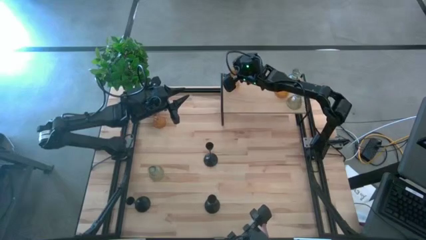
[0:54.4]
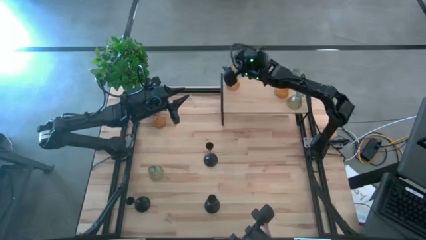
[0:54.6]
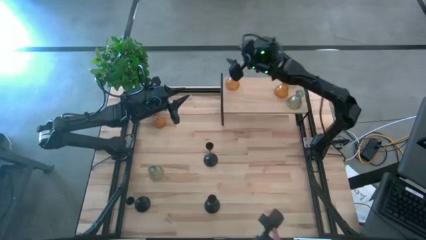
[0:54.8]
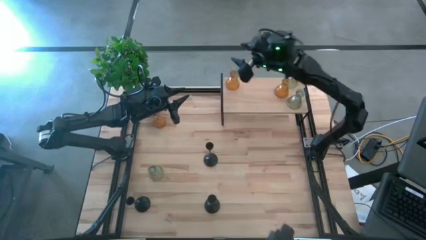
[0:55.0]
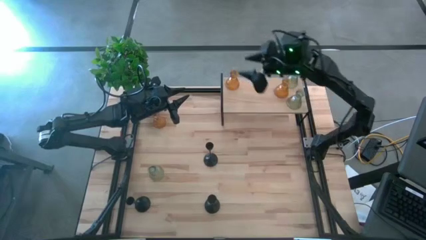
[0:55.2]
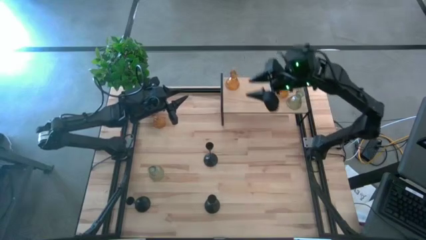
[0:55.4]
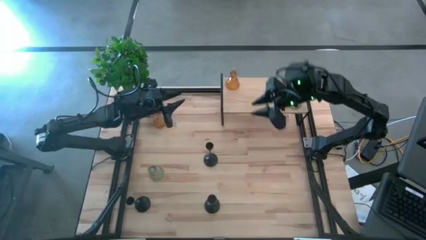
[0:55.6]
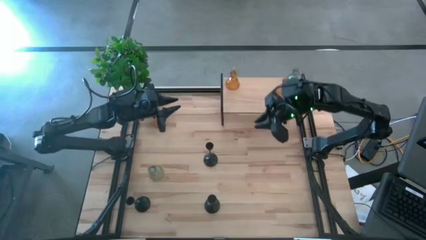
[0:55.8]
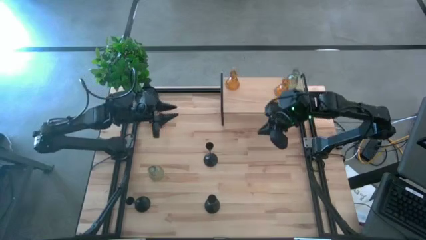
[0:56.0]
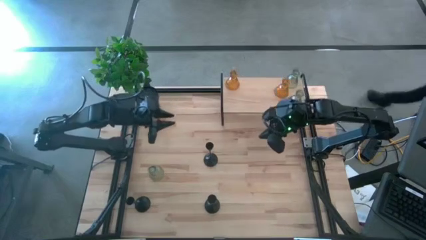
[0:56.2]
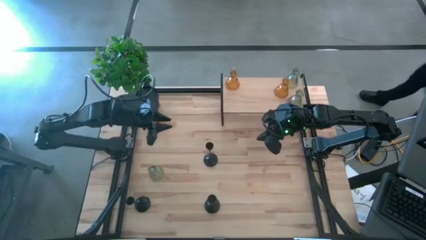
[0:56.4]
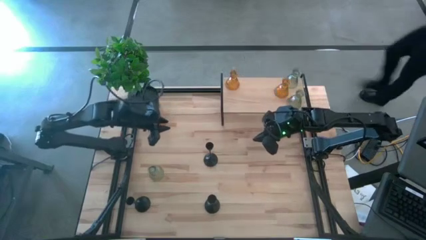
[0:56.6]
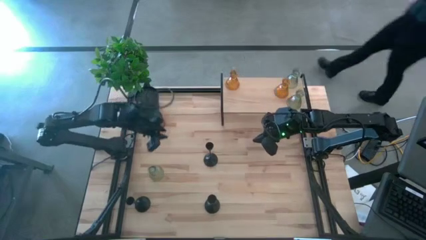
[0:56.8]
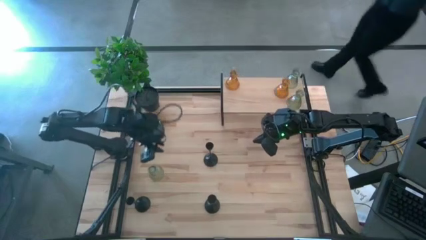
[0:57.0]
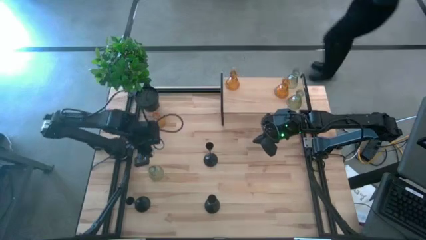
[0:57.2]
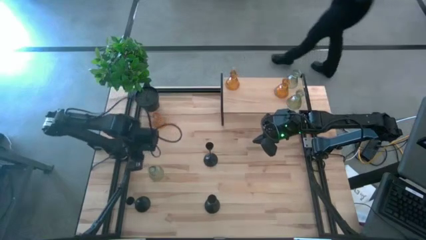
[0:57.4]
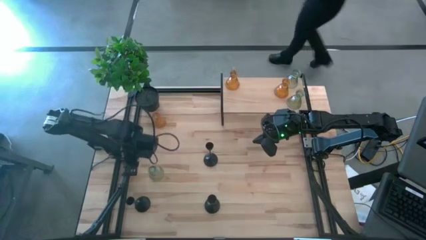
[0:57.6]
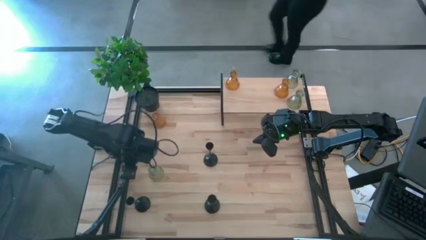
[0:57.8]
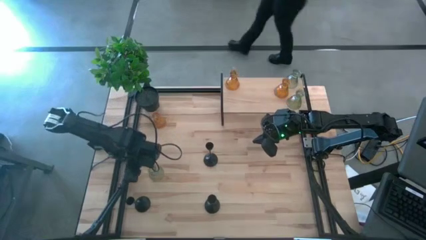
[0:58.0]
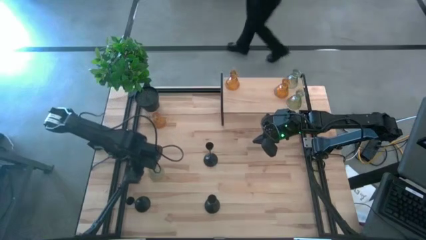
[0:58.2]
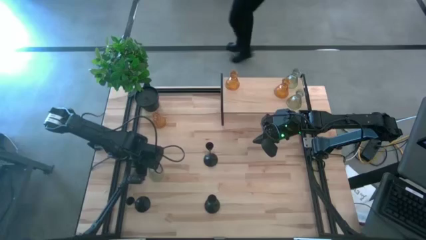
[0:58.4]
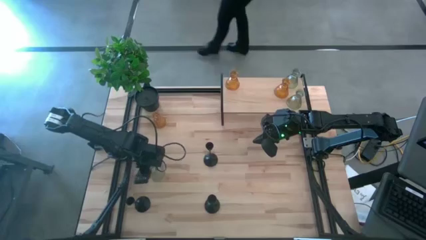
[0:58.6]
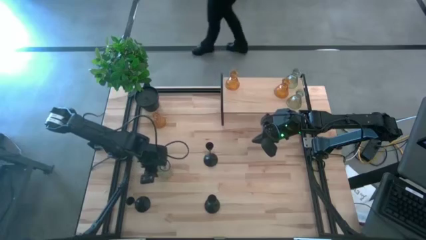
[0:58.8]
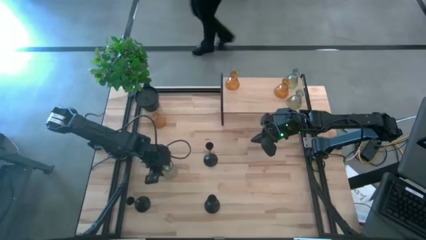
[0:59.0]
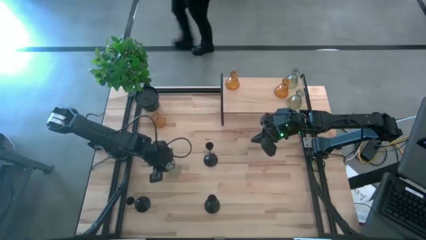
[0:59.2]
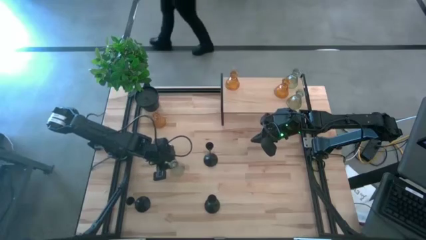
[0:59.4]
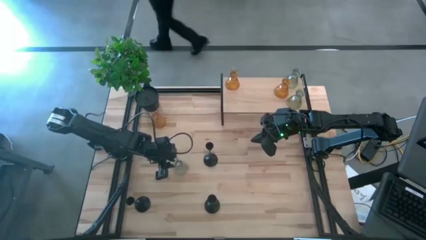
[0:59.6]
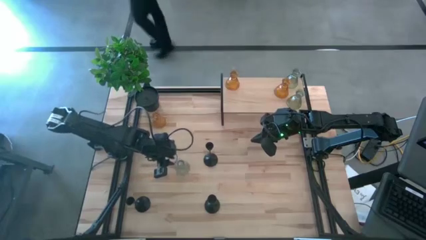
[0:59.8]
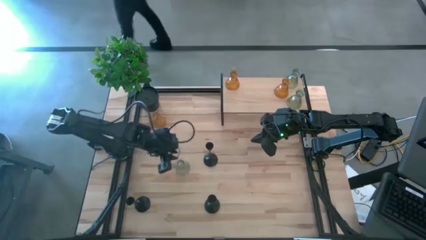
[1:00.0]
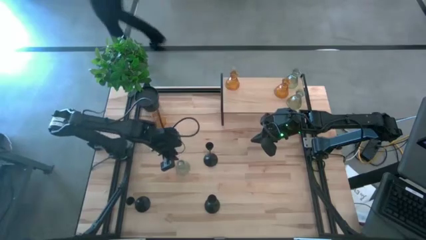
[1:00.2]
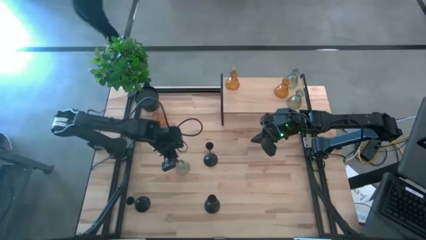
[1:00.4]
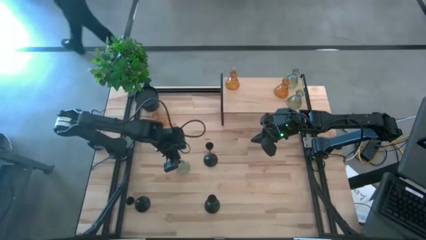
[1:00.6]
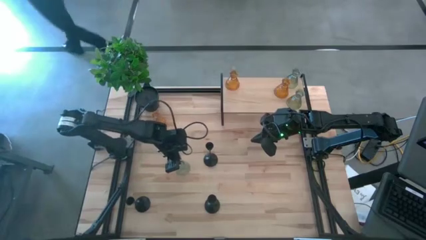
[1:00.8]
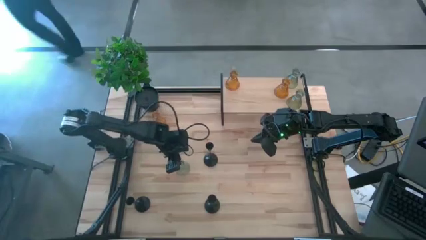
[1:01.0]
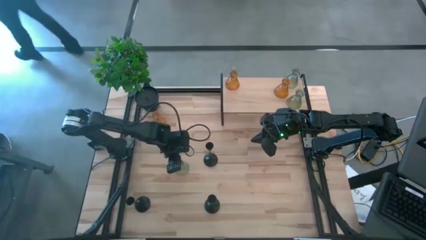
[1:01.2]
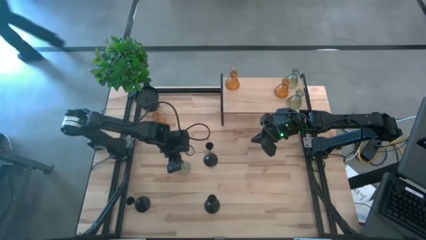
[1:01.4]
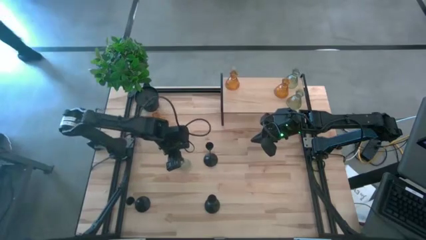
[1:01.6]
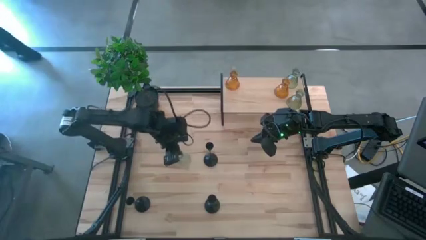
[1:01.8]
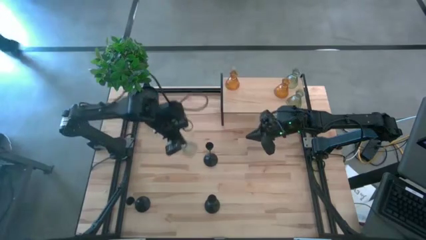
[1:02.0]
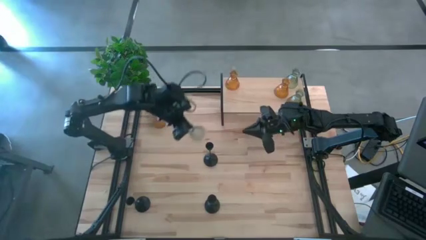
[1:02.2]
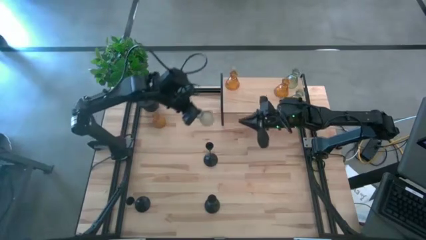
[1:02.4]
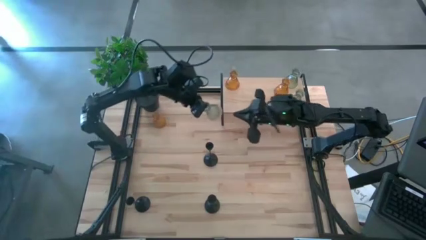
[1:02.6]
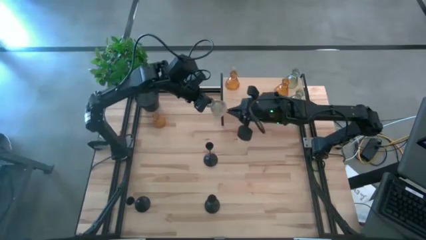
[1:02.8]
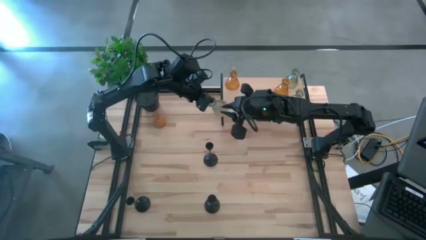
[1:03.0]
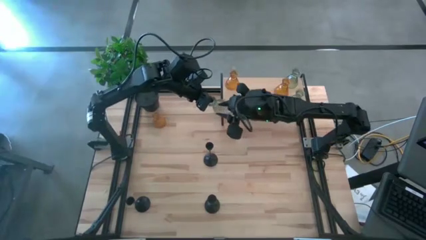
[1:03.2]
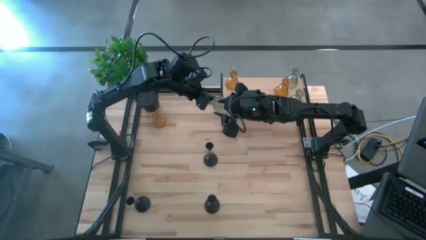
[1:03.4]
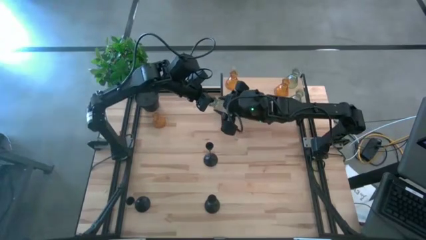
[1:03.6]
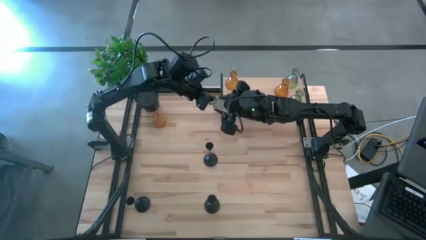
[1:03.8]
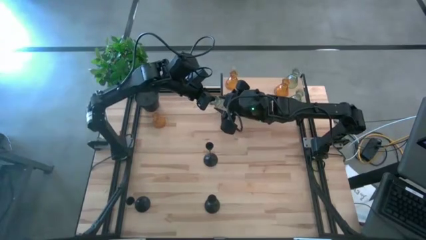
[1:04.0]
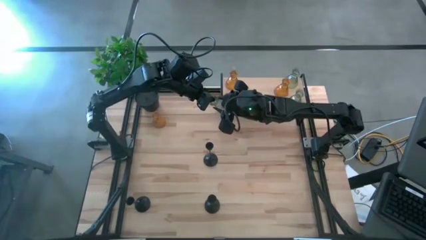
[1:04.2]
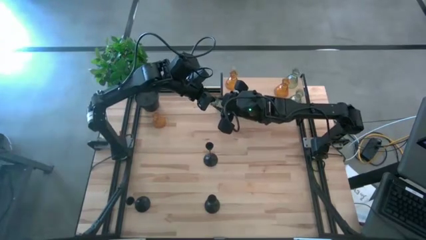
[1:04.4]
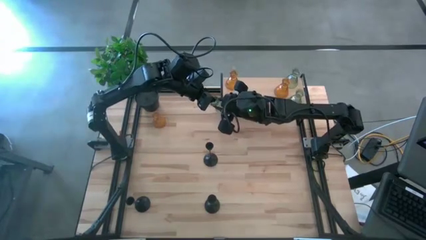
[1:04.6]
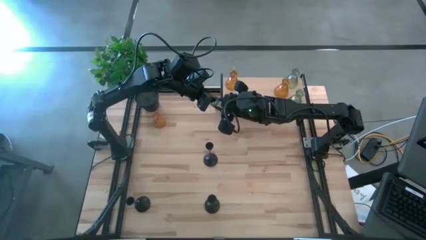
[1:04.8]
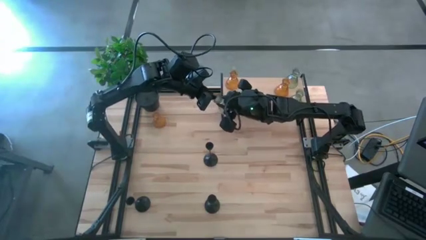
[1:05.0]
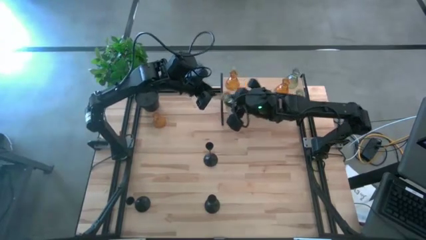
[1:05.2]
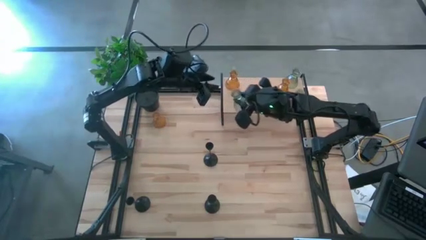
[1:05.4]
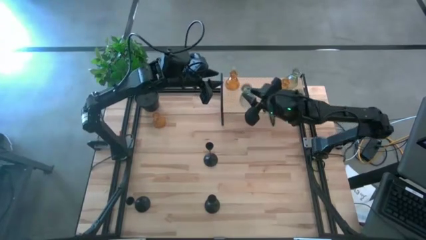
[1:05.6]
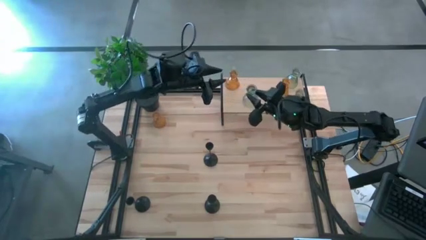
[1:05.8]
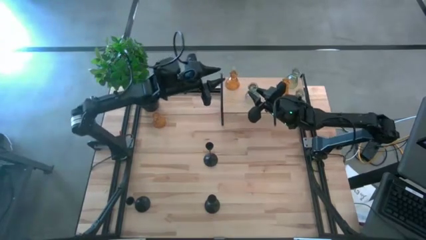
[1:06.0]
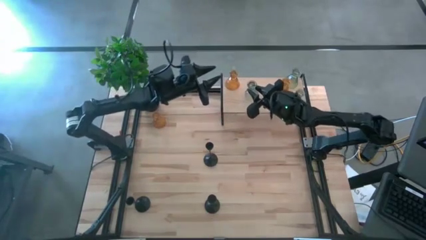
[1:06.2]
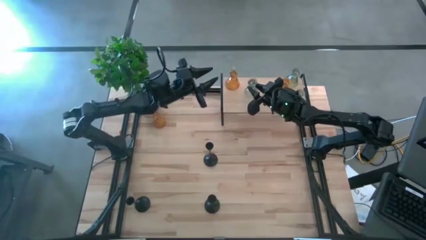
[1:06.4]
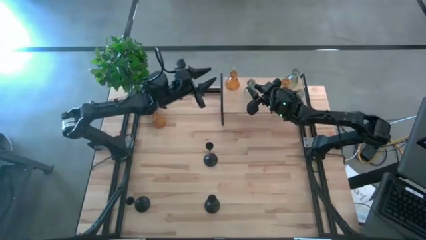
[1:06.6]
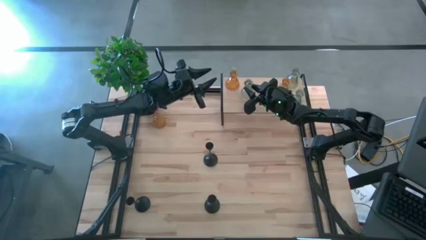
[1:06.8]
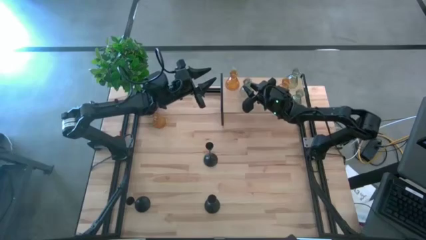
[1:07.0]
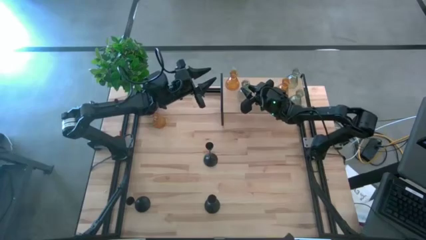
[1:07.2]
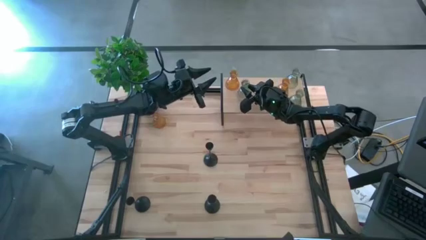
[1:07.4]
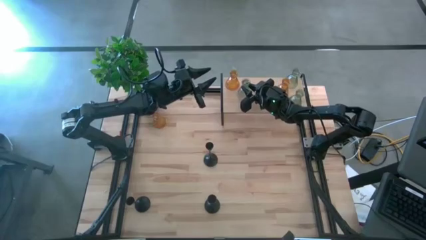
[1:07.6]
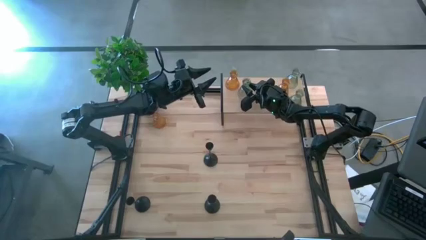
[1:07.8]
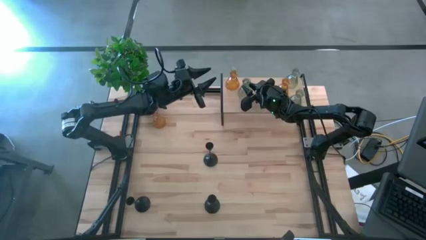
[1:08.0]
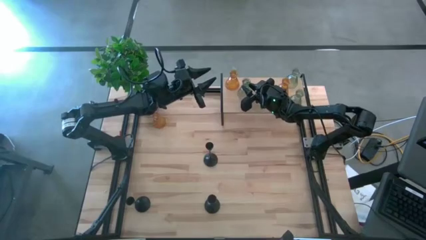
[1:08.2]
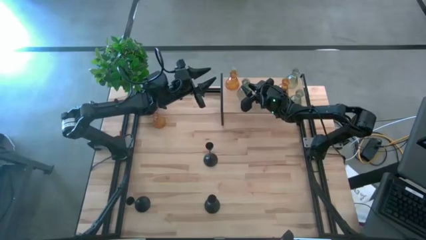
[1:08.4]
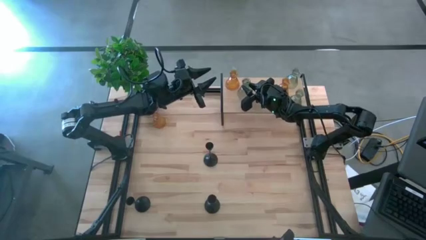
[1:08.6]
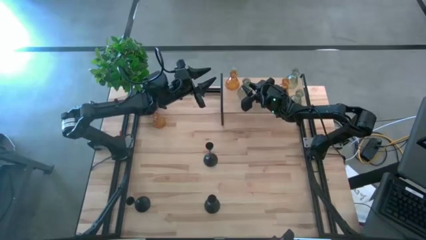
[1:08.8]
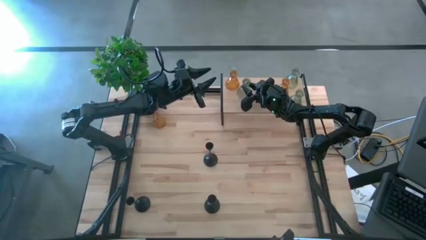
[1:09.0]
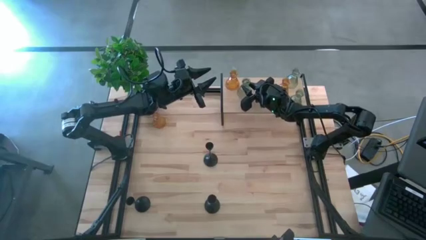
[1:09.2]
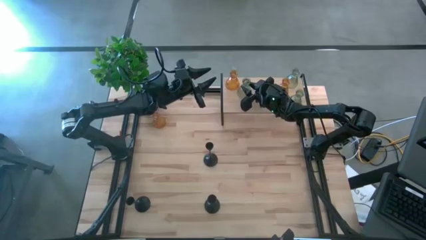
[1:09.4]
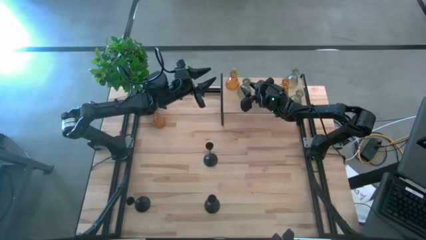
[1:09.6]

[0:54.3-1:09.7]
Task: Pick & Place candle stick holders
Put the green glass candle holder on the shelf
